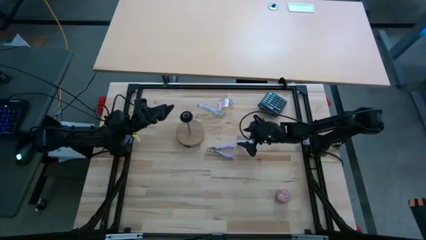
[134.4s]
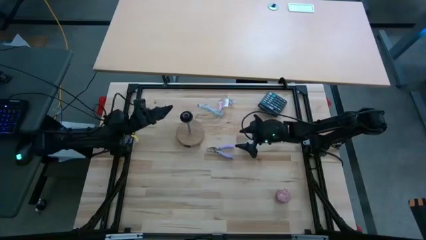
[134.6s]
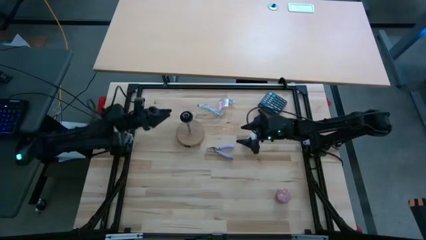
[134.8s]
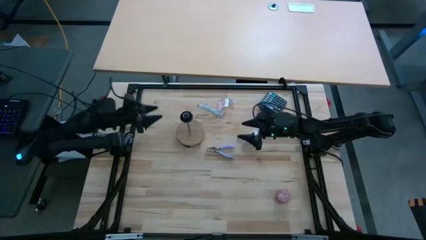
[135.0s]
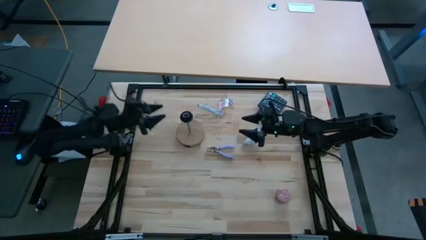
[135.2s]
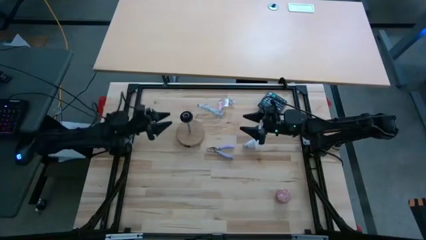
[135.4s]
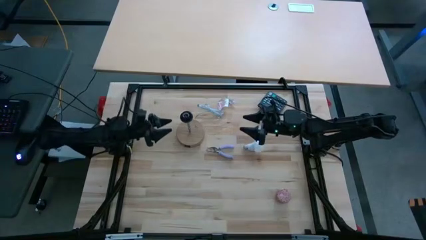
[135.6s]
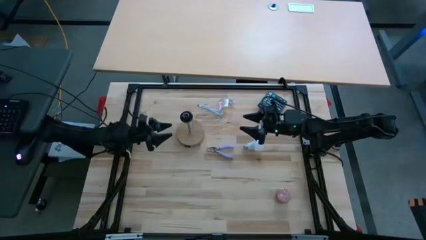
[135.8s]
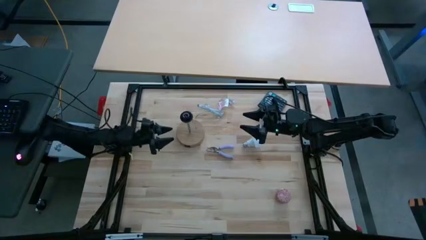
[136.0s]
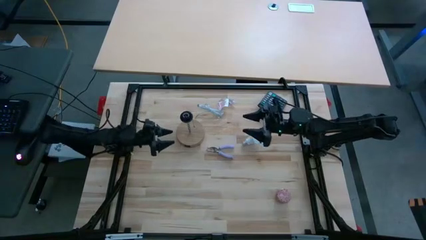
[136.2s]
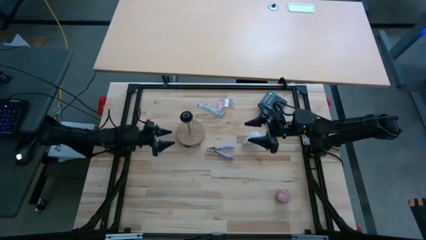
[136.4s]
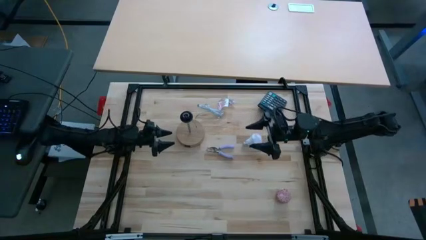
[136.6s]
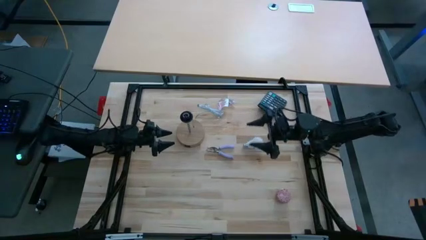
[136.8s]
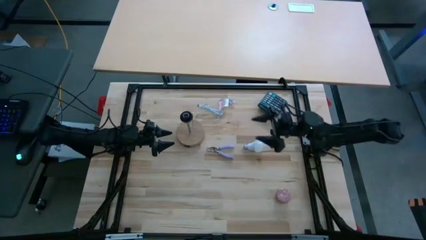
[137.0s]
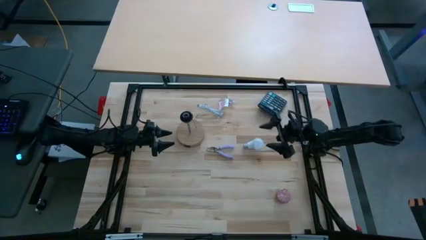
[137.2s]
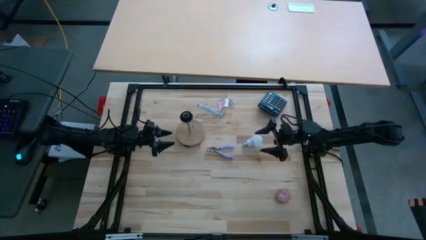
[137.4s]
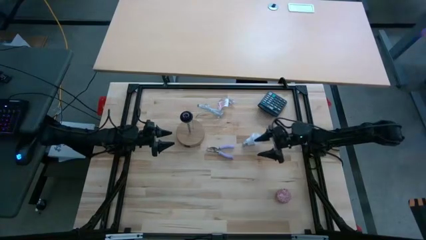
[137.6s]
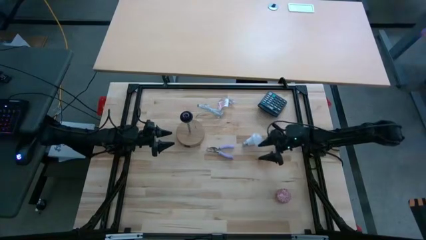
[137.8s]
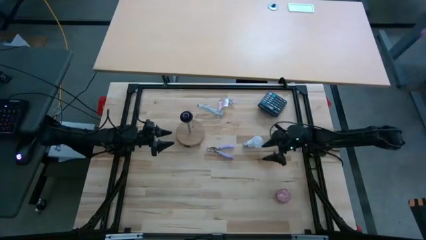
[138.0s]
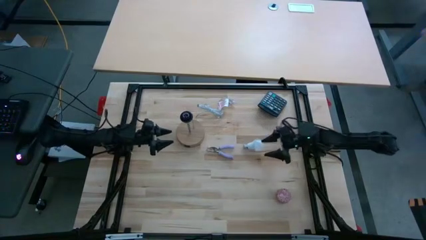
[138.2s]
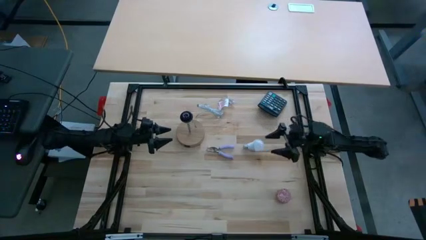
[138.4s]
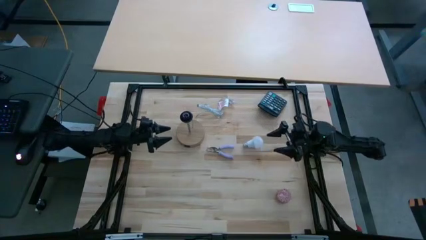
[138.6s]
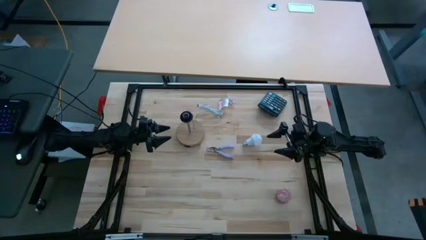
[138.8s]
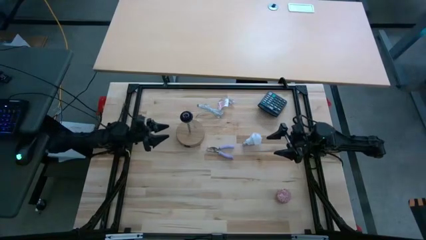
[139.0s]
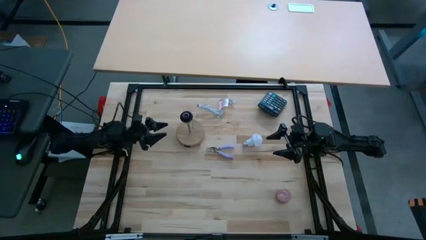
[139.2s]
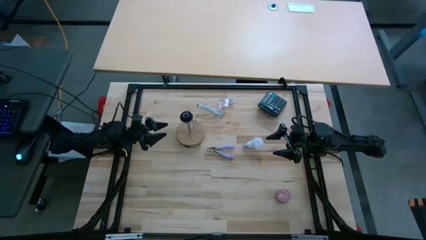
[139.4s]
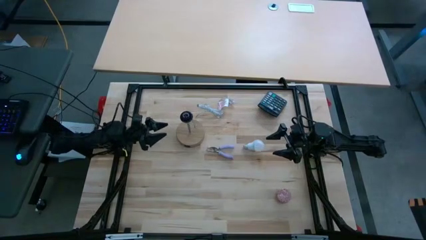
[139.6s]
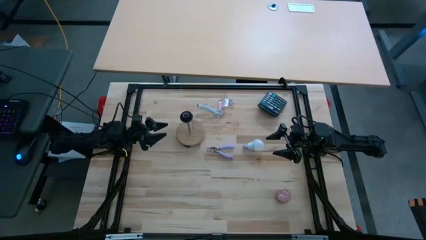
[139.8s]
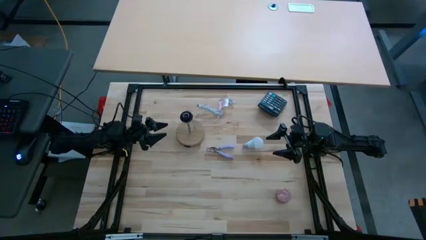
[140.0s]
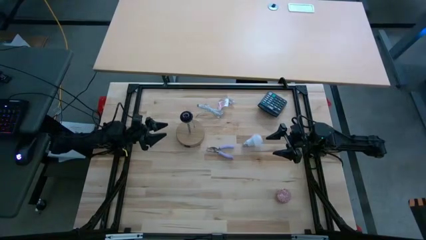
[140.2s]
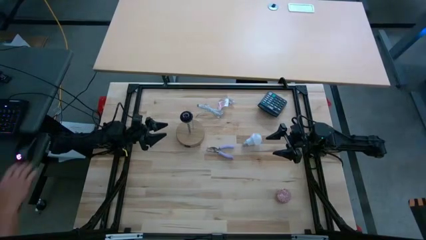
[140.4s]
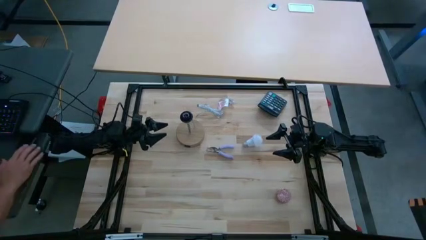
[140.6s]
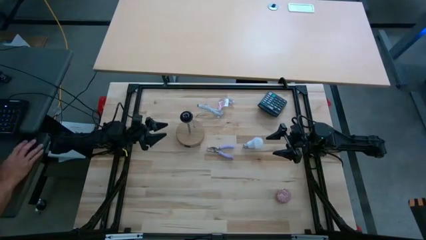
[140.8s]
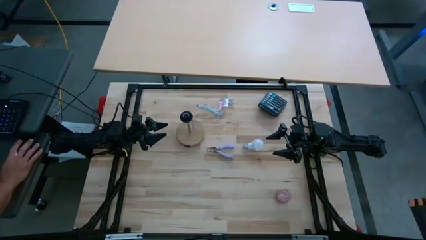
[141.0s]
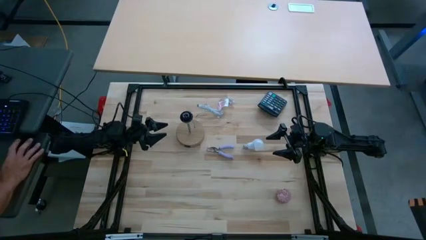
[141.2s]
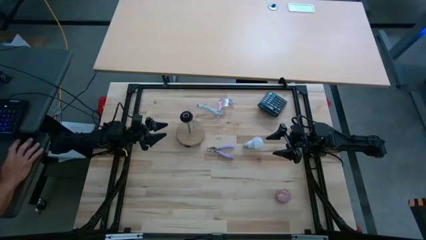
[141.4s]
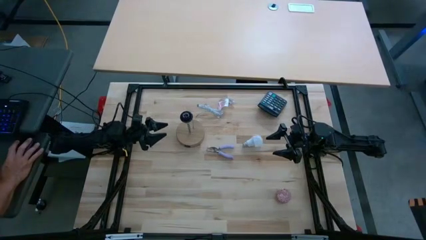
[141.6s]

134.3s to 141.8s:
Task: Screw lightbulb
Return to Home Position

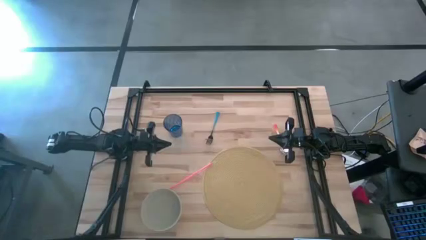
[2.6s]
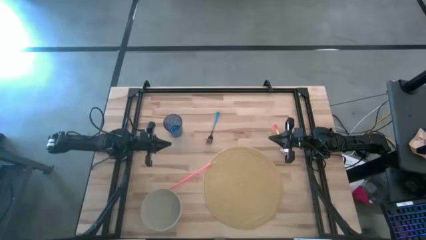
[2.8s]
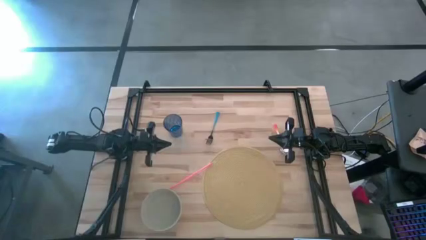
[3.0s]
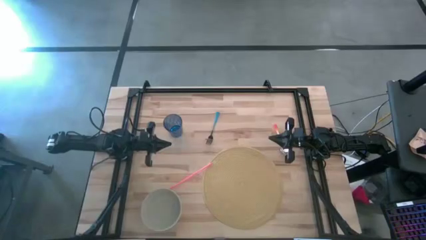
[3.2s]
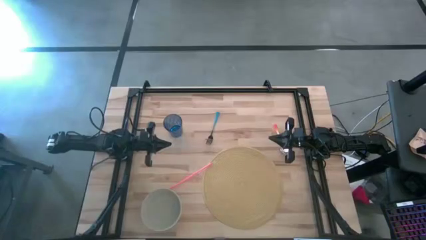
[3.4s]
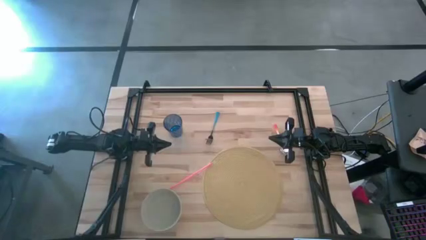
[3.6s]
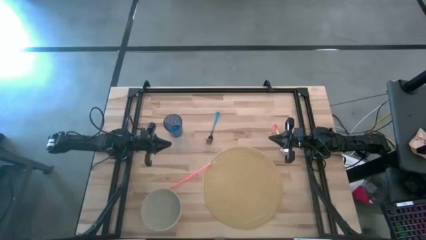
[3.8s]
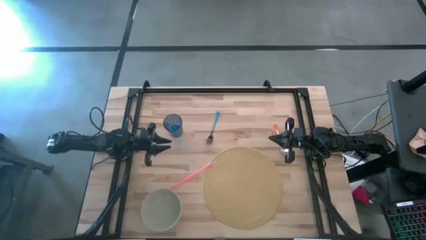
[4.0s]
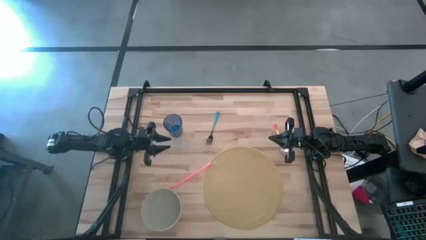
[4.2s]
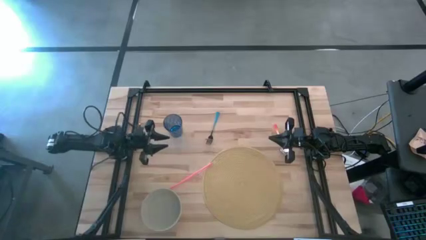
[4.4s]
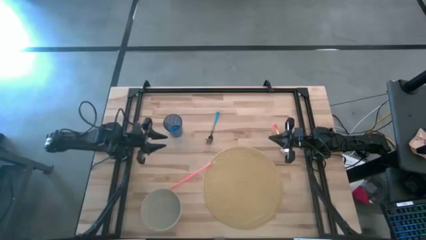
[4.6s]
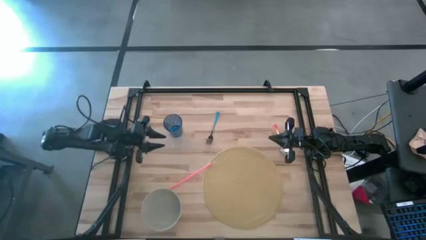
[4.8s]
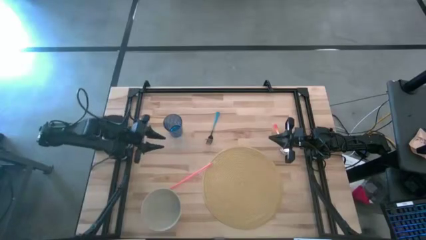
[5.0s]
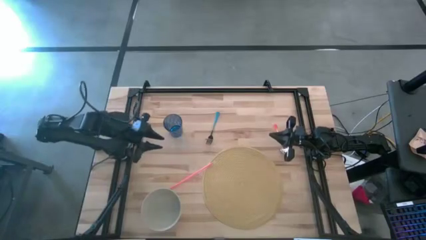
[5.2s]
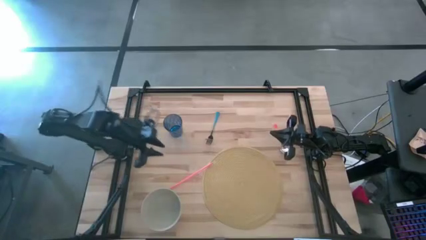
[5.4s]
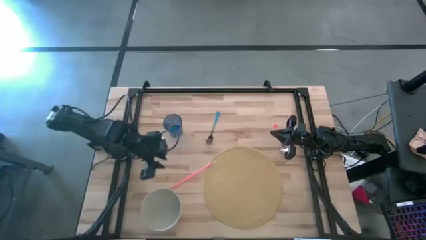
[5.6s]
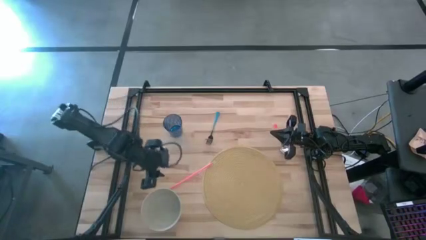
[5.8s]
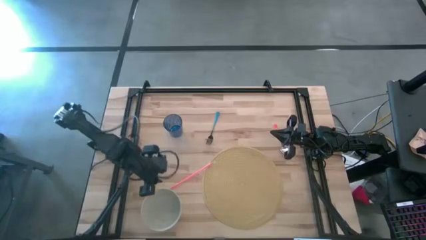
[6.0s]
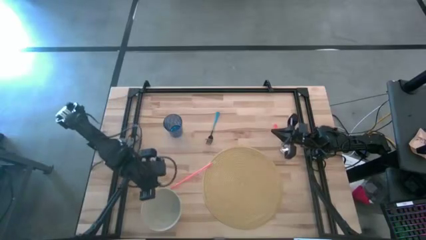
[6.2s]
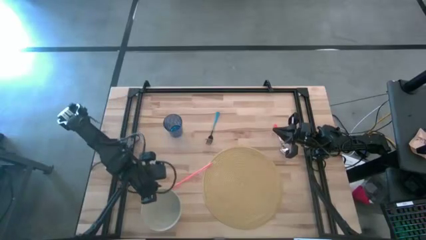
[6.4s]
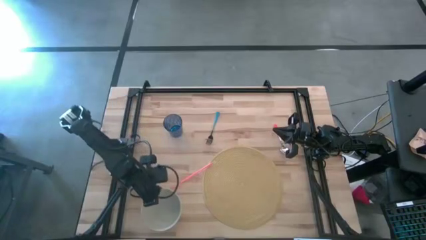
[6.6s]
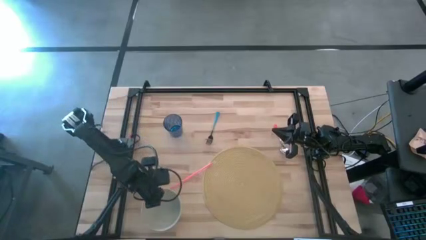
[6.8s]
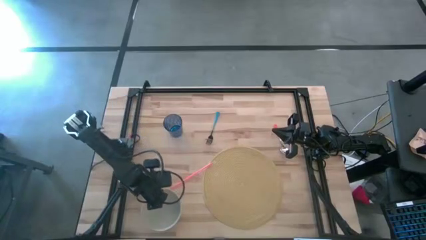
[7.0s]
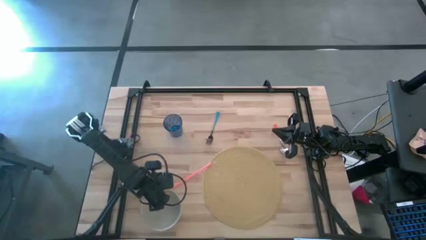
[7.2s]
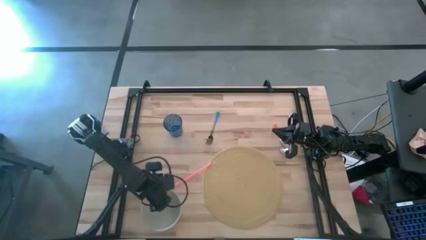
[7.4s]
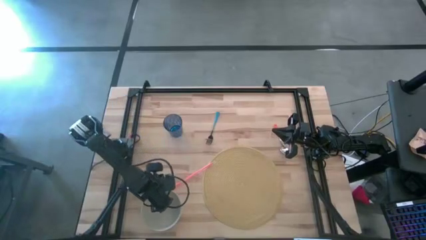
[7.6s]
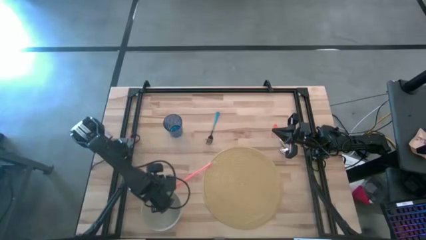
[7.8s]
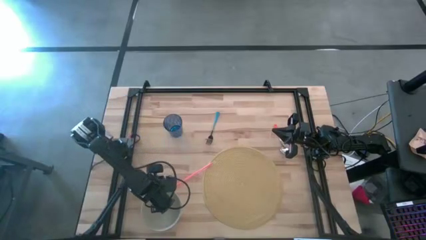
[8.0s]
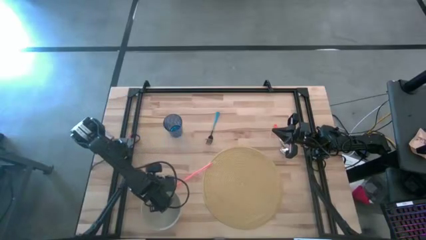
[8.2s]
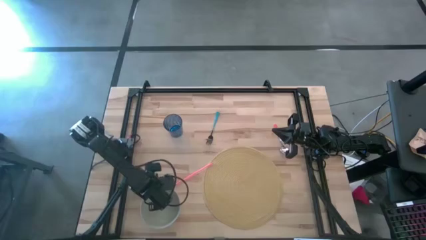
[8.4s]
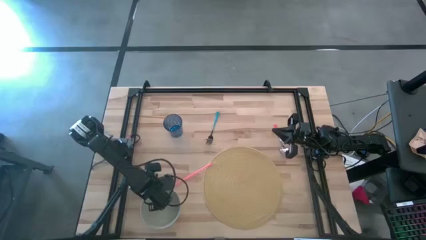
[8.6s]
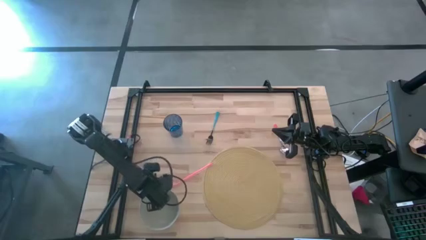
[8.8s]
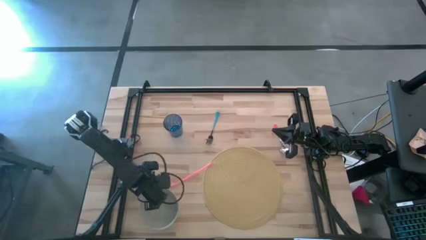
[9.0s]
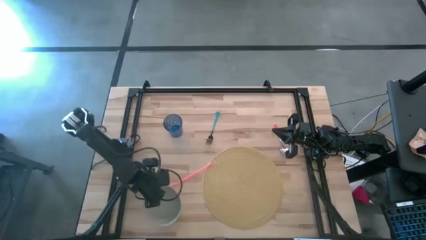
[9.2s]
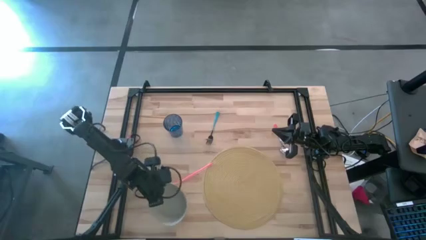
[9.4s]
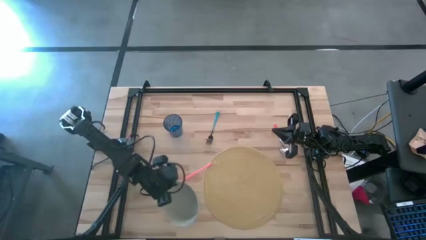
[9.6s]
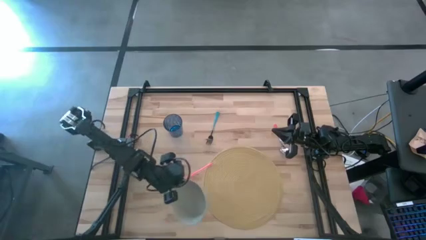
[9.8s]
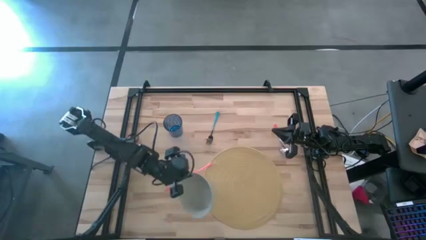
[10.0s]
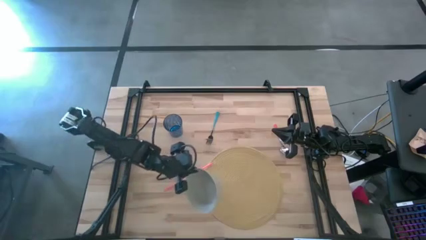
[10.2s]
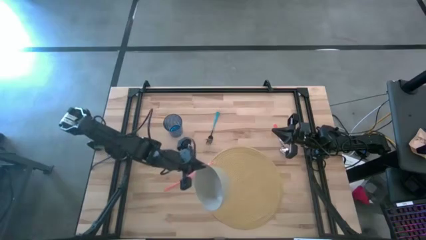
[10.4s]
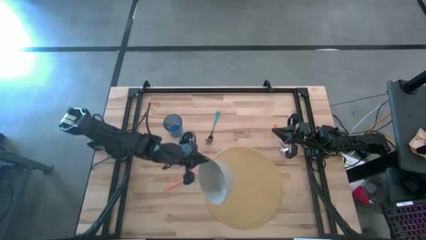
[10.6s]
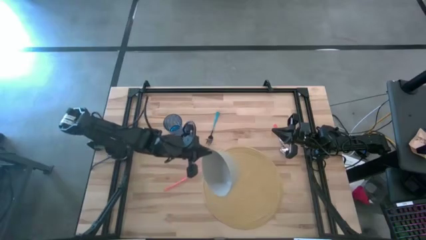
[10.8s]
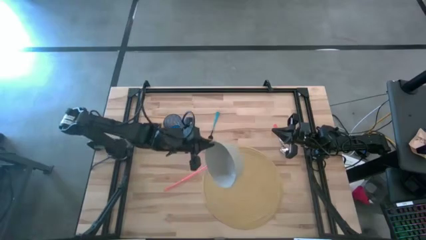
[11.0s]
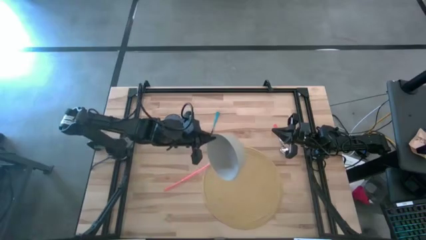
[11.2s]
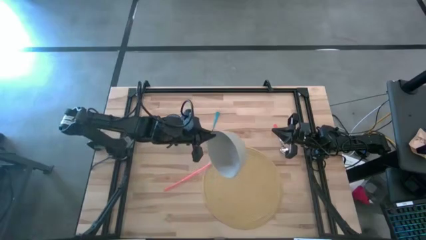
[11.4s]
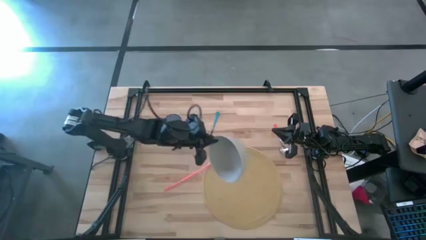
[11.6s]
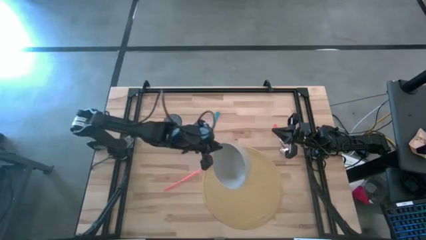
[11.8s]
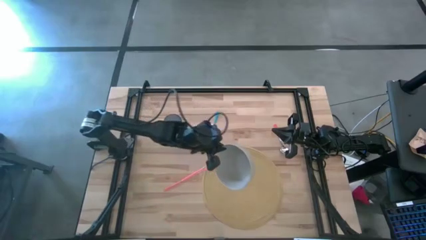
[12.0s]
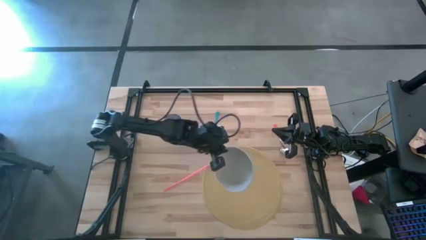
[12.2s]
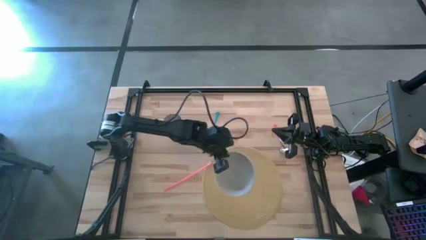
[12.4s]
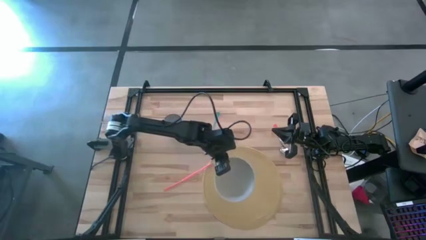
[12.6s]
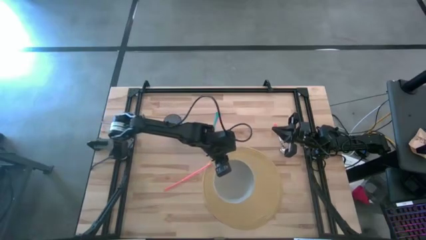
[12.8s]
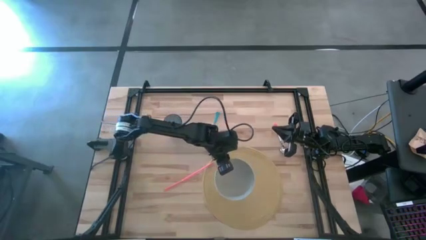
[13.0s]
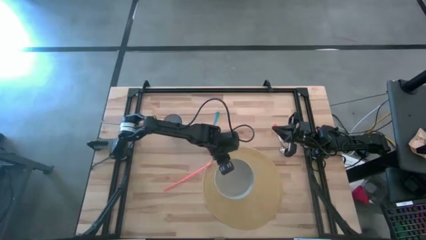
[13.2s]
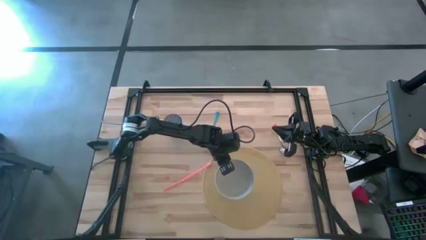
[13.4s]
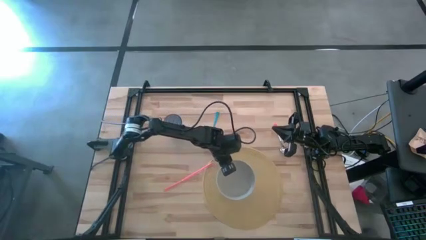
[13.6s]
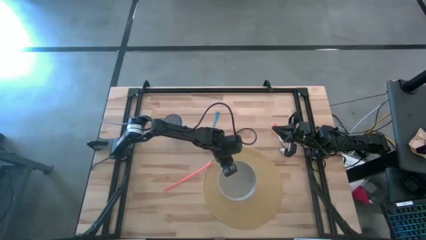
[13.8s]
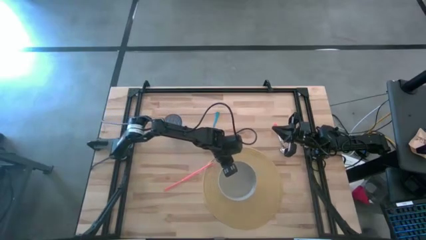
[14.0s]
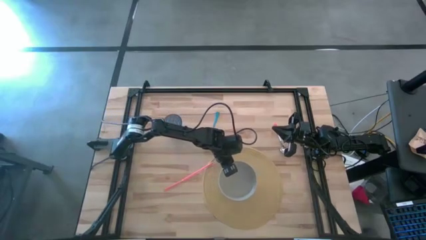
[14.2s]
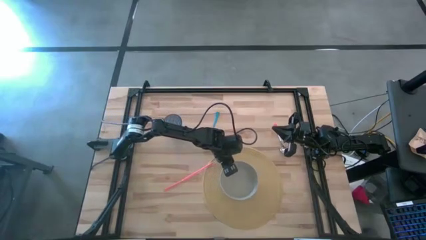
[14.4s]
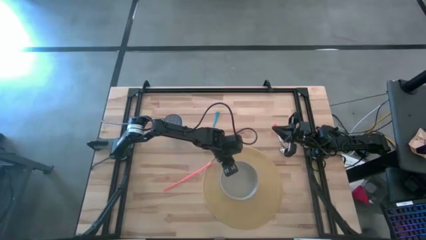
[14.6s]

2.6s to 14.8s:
Task: Pick & Place Utensil
Put the gray bowl on the yellow mat
